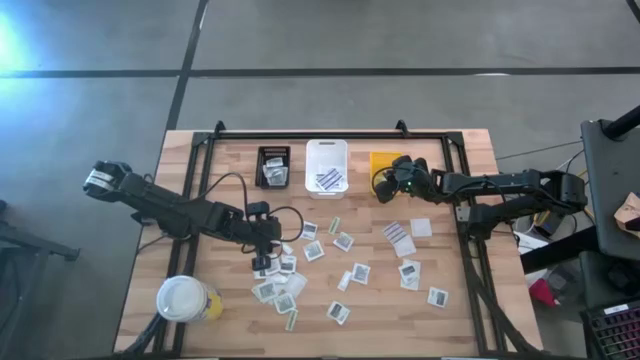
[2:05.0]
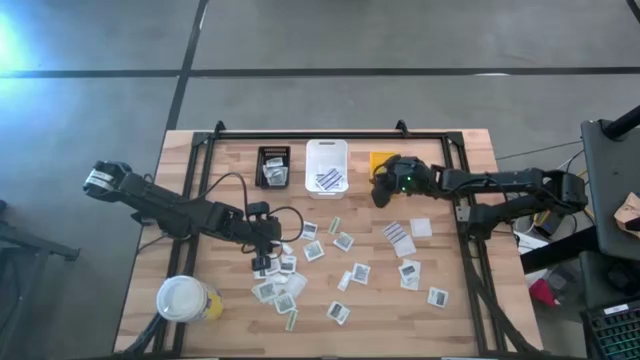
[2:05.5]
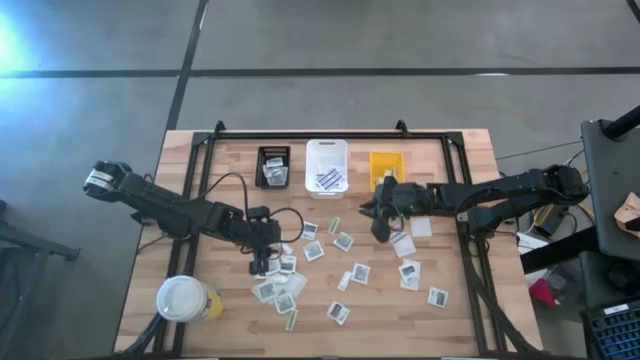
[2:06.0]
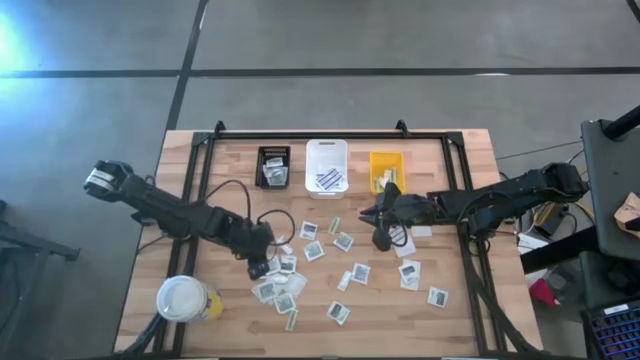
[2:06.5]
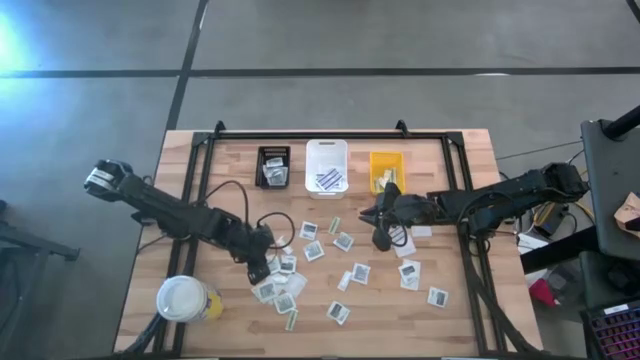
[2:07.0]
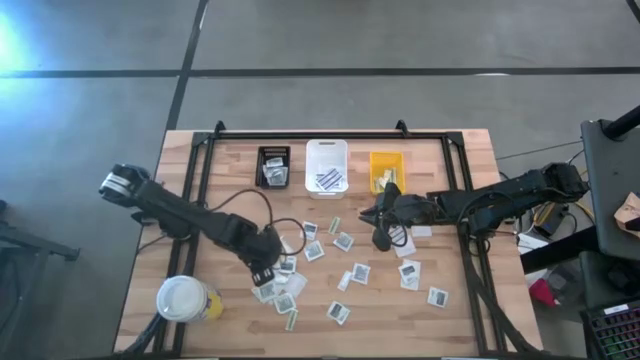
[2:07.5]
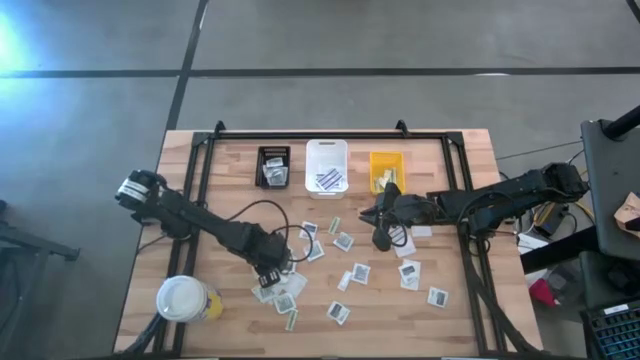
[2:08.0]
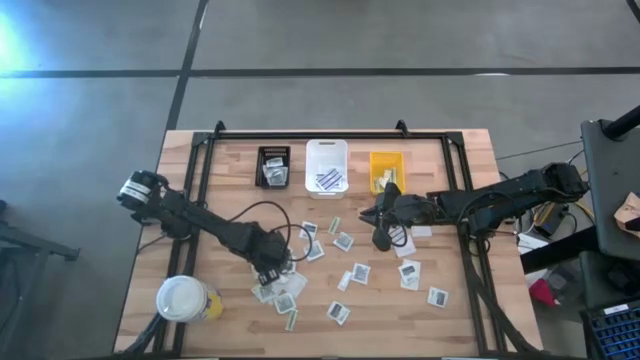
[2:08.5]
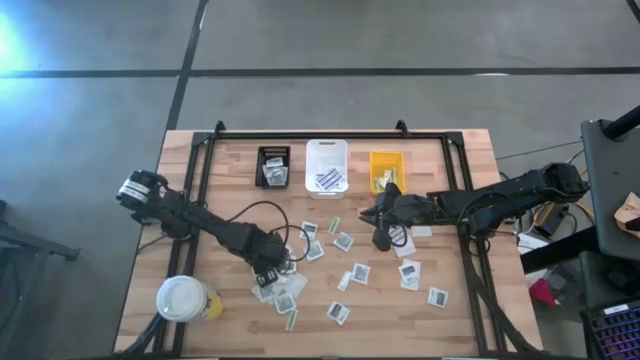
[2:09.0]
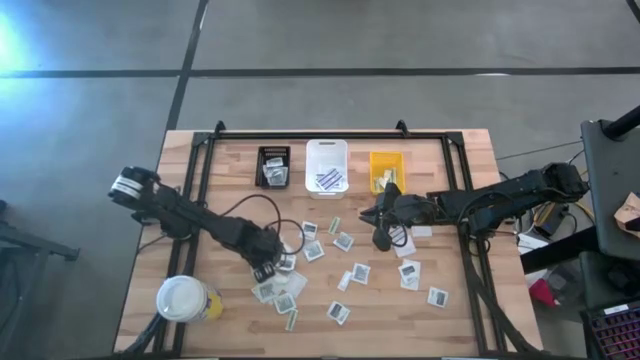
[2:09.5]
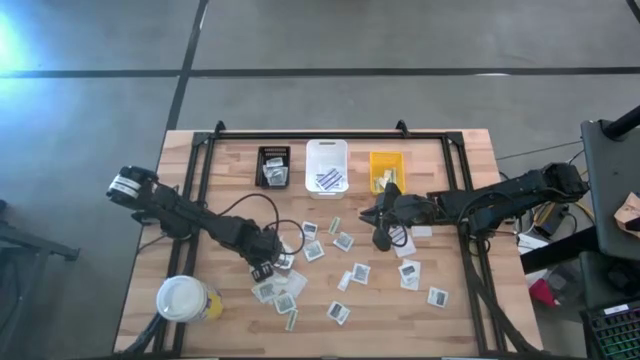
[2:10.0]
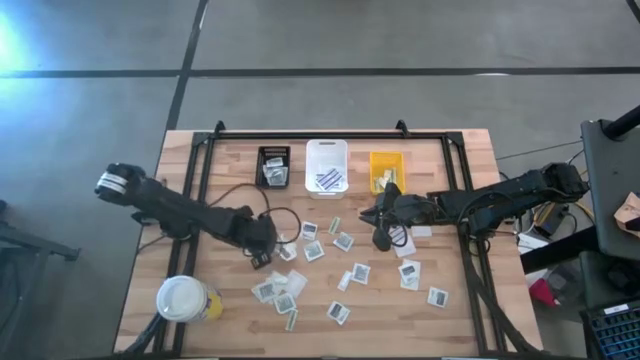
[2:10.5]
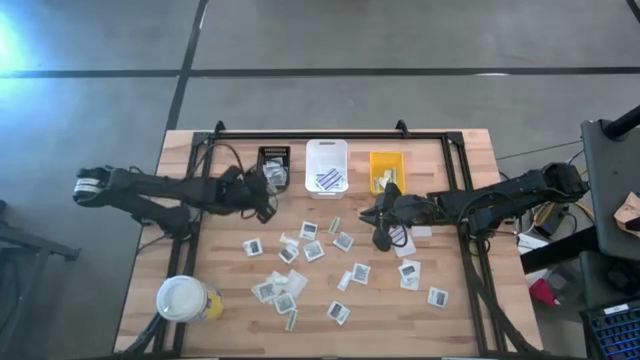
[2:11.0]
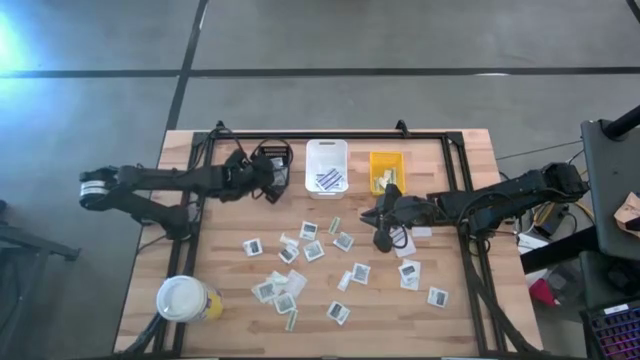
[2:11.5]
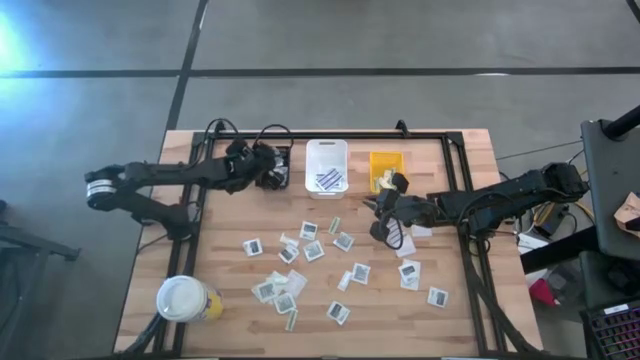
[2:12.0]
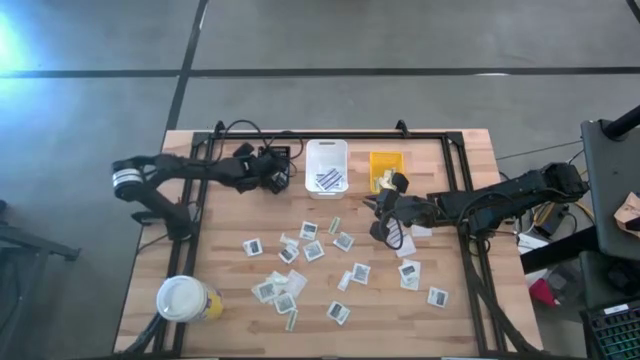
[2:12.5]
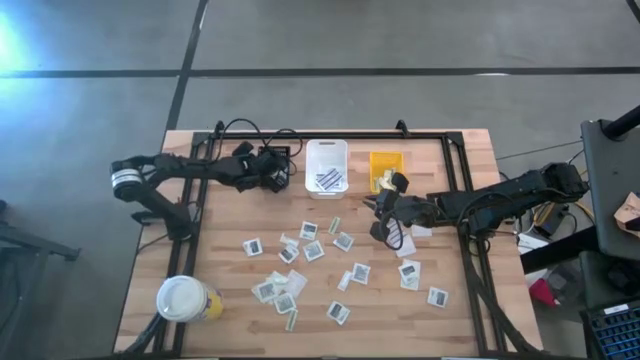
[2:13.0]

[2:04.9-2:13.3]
Task: Pick & Place First Aid Supplies
Put the towelette pack into the black basket

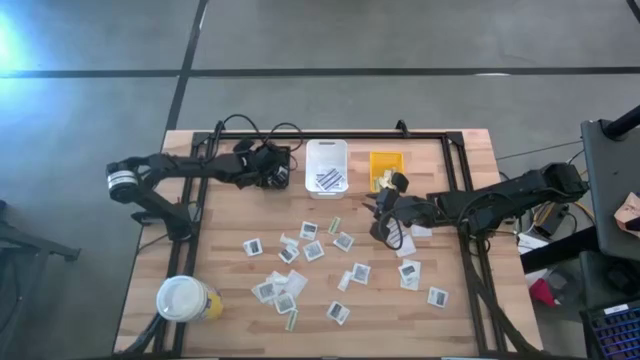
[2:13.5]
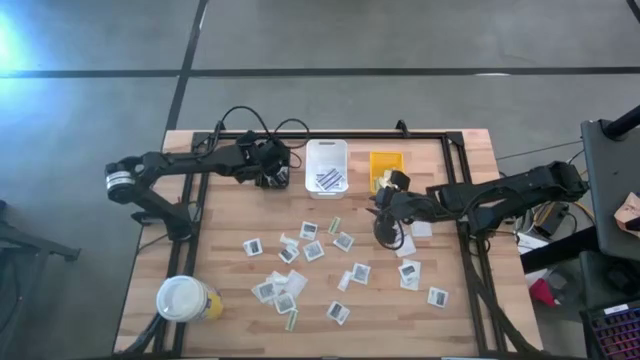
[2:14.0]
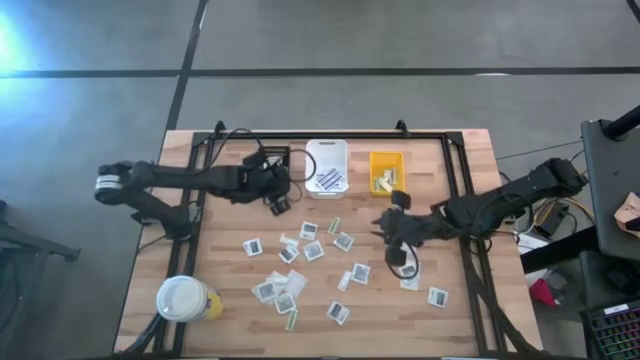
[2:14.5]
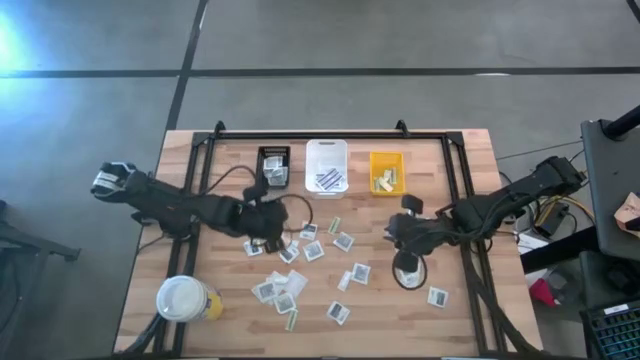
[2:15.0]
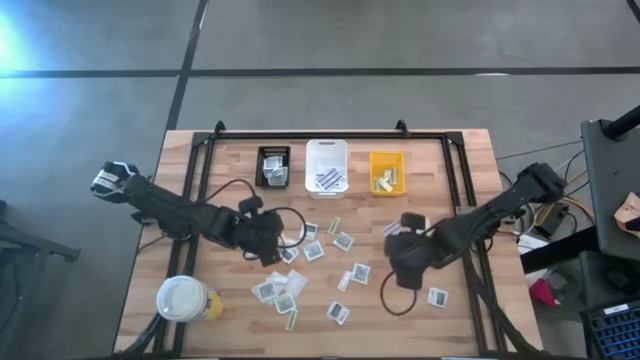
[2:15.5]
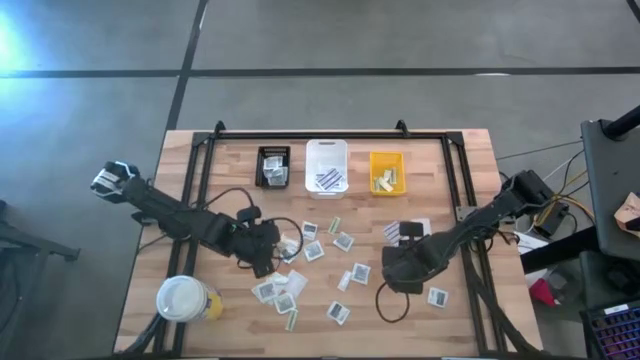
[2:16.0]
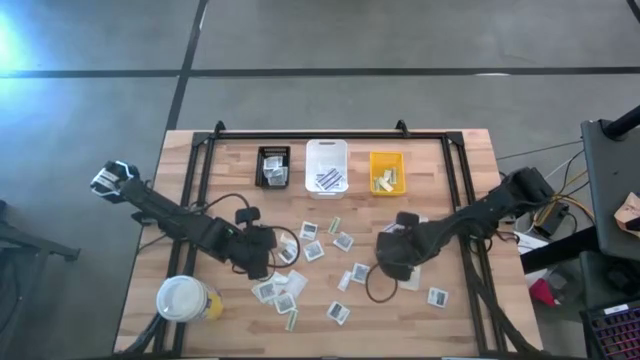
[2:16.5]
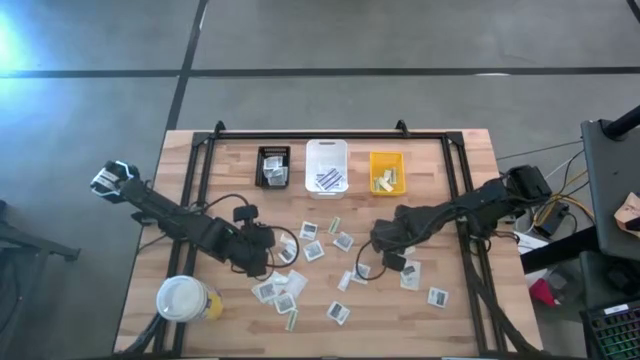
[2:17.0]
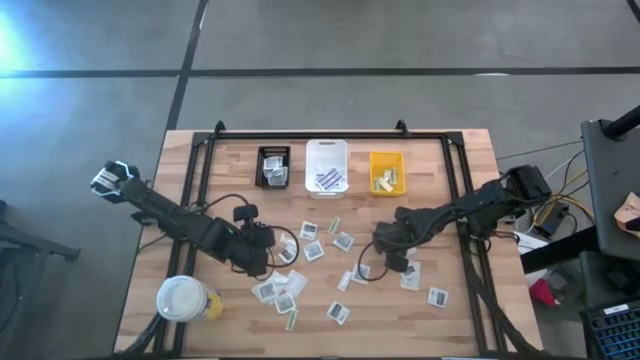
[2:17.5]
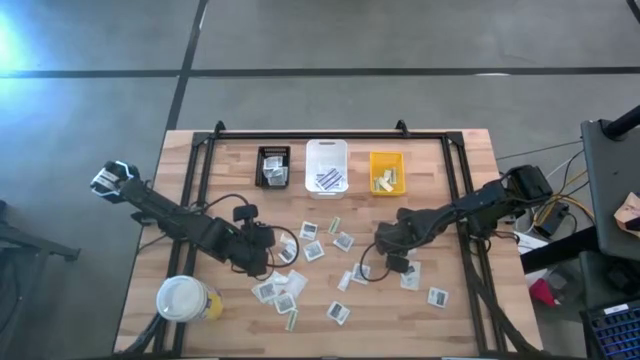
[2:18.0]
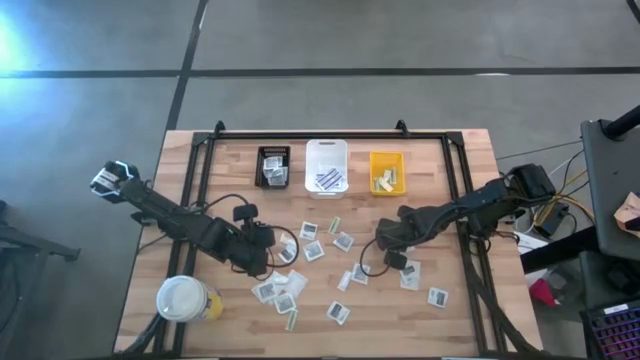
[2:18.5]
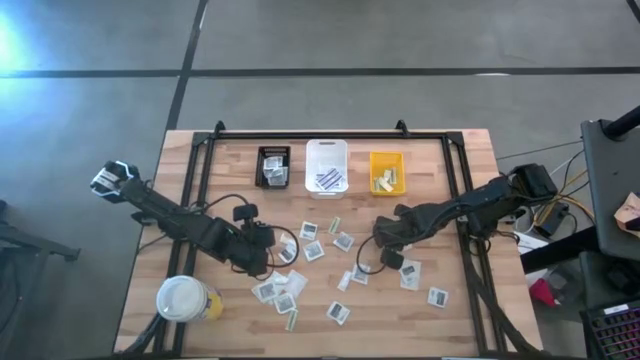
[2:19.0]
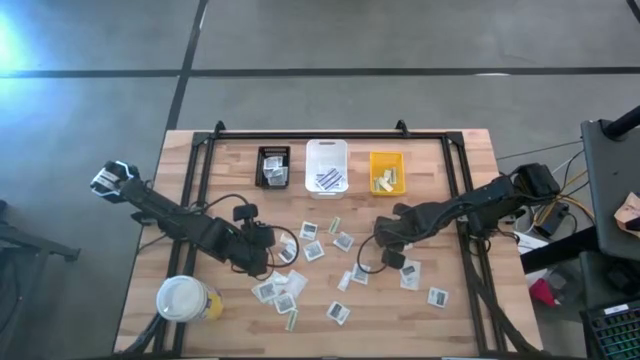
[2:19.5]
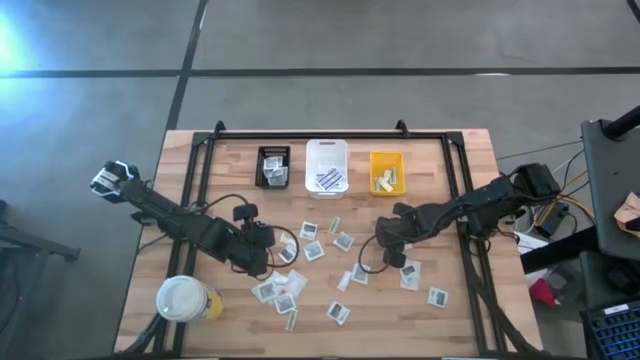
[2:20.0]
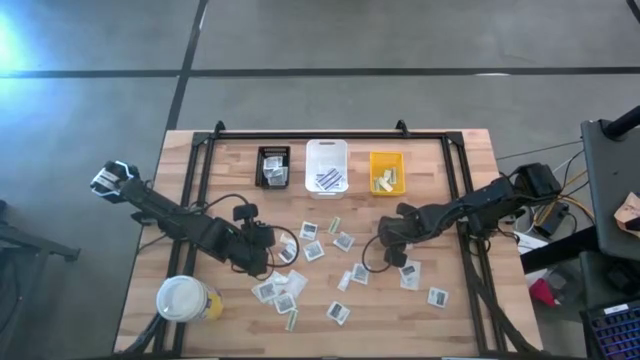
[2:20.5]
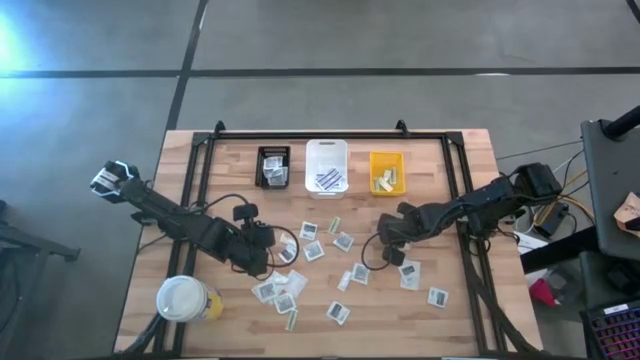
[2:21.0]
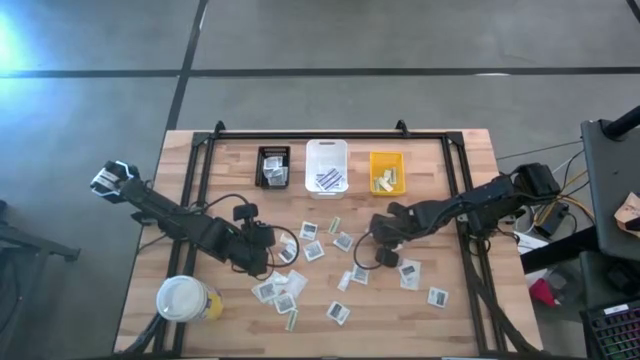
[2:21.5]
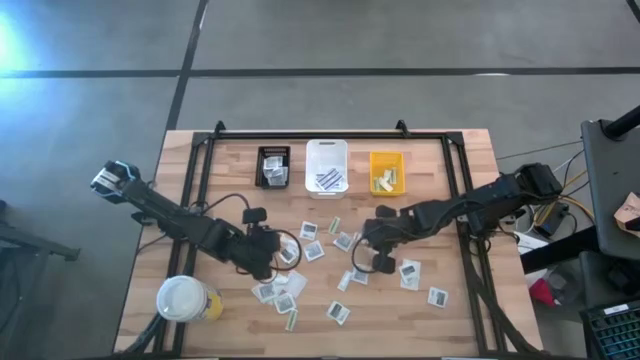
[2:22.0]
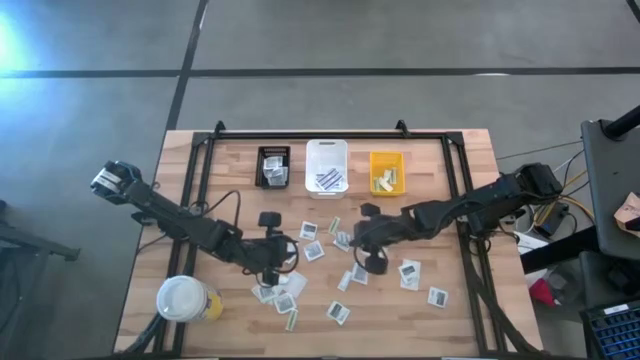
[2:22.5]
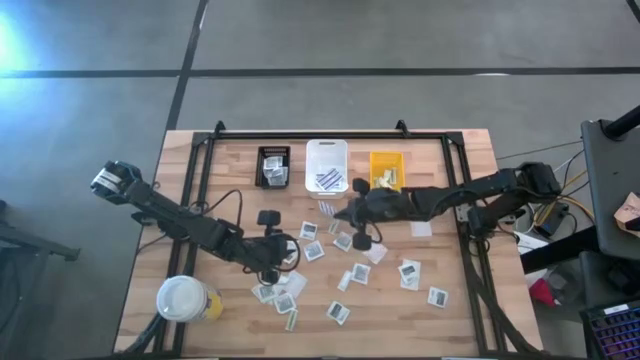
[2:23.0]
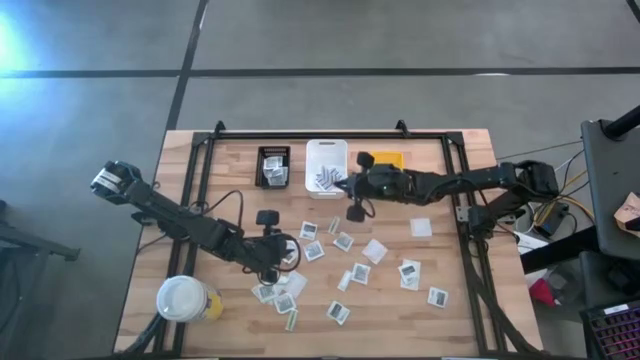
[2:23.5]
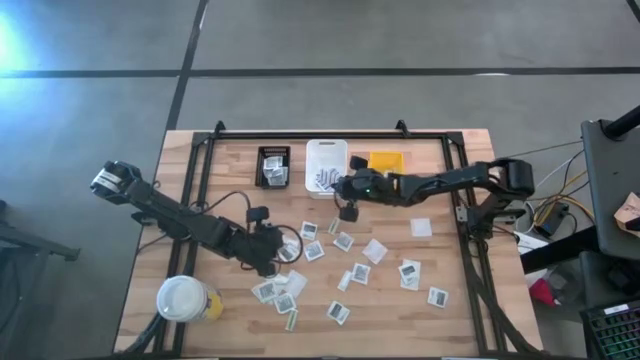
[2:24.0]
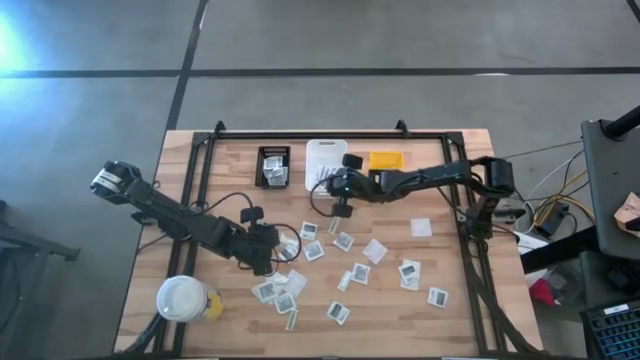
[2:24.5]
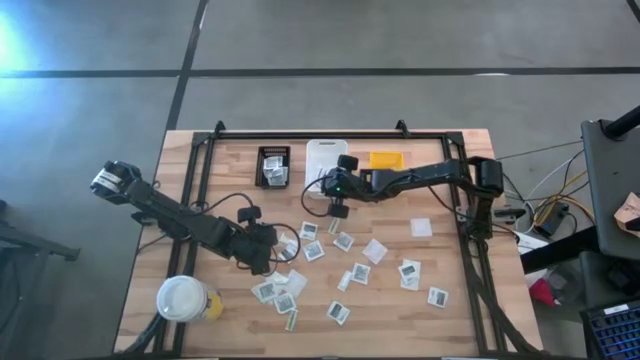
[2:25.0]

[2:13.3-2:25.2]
Put the blue bandage into the white bin

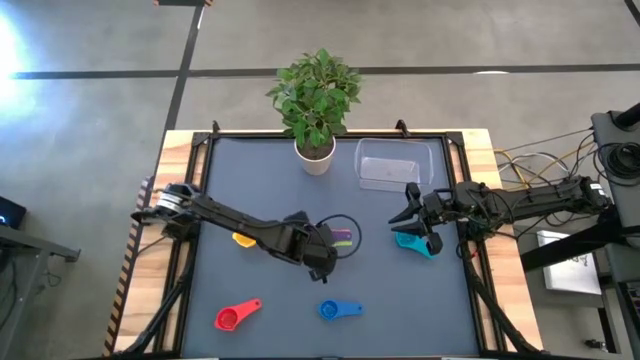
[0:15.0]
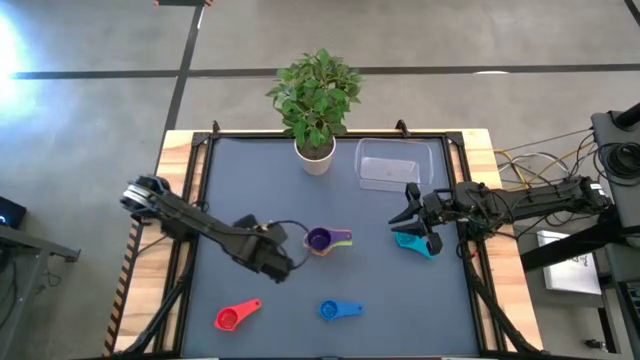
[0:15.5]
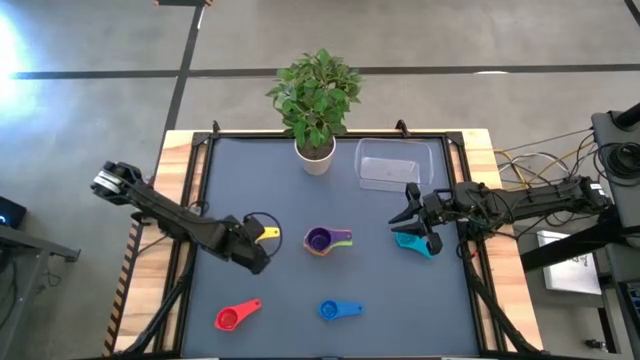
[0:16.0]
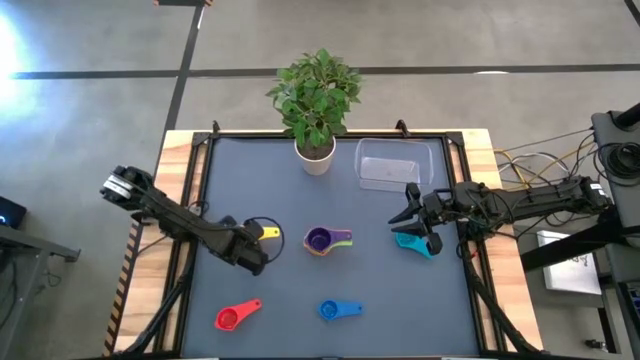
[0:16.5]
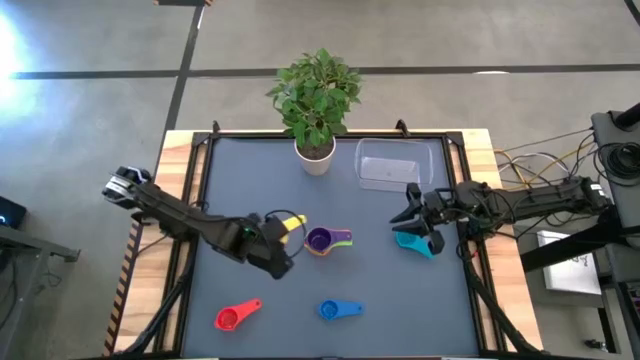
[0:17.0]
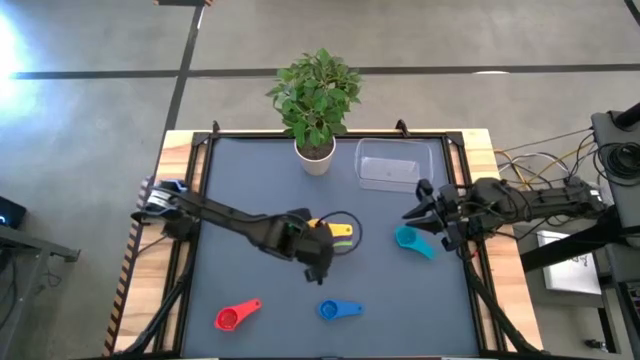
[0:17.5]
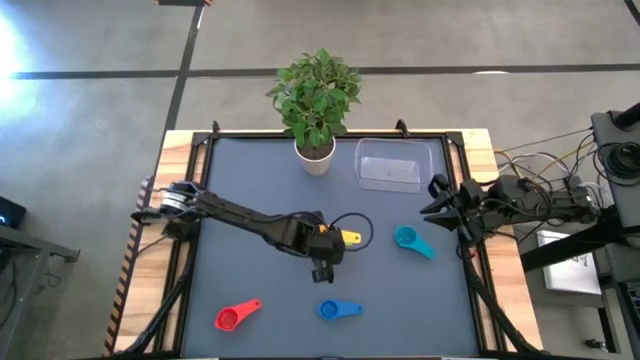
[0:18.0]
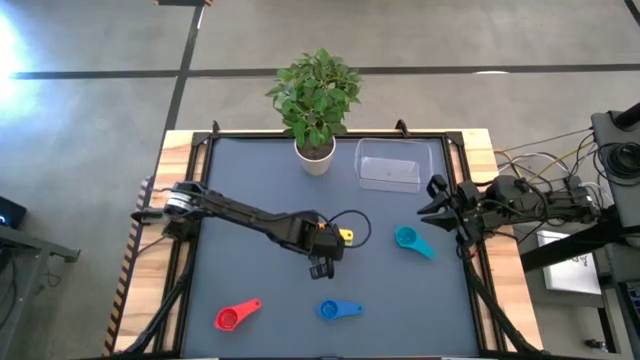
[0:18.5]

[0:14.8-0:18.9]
Task: Nest measuring cups in basket
Stack the yellow measuring cup on top of the violet measuring cup
